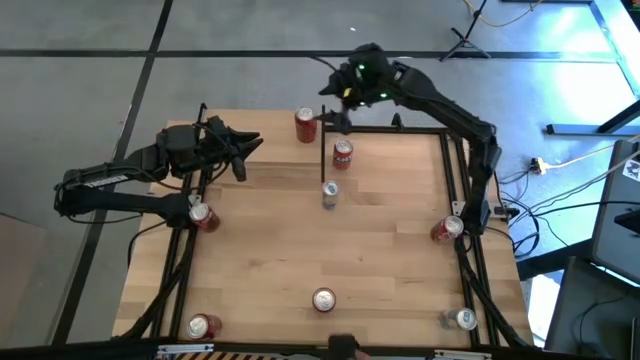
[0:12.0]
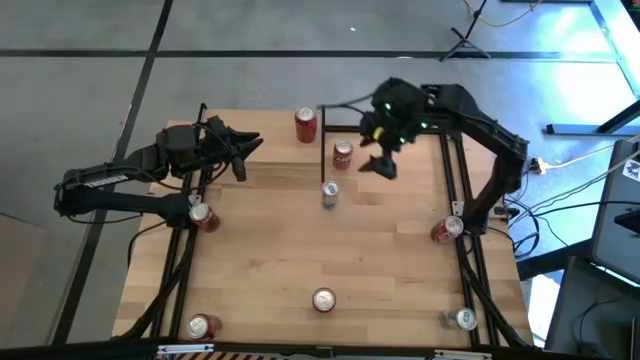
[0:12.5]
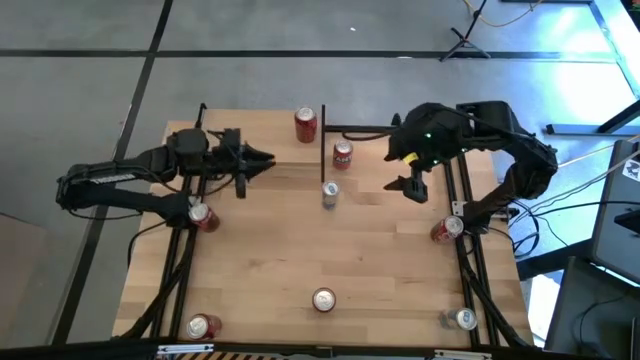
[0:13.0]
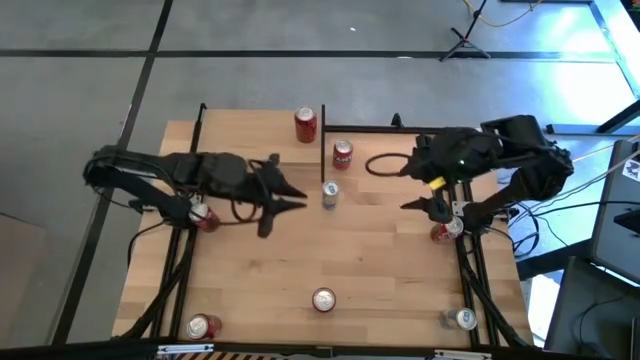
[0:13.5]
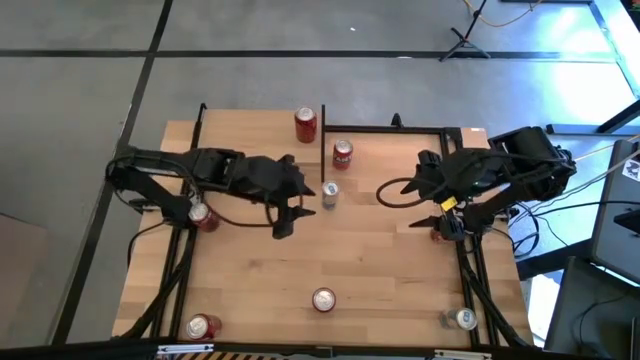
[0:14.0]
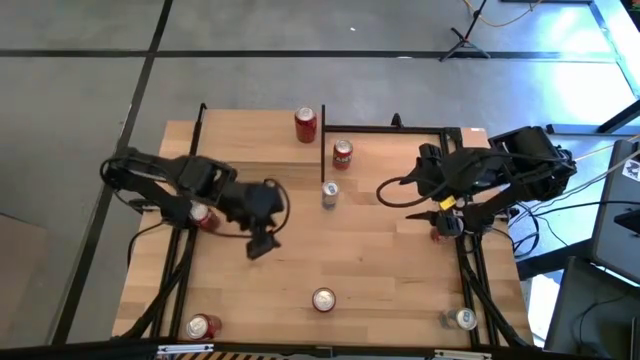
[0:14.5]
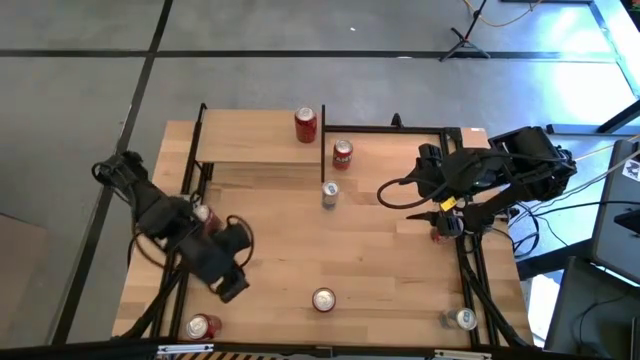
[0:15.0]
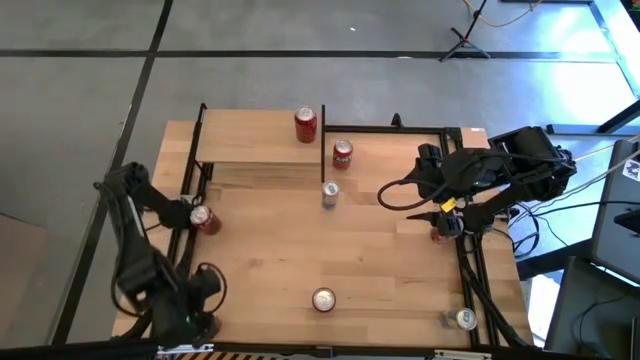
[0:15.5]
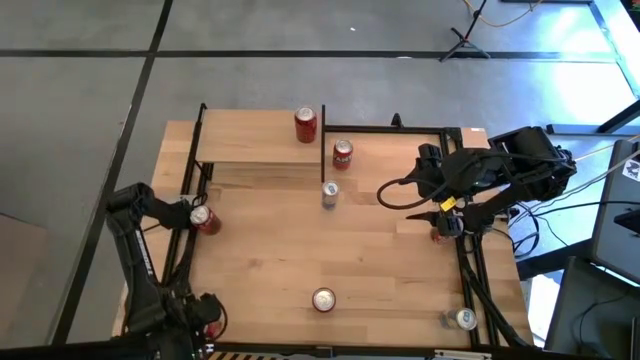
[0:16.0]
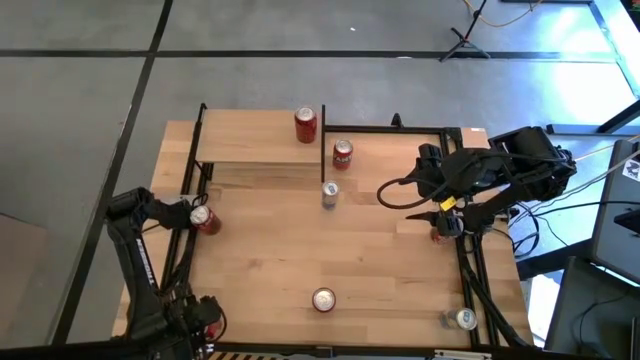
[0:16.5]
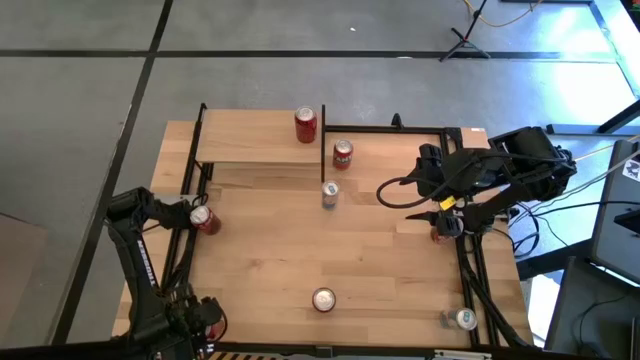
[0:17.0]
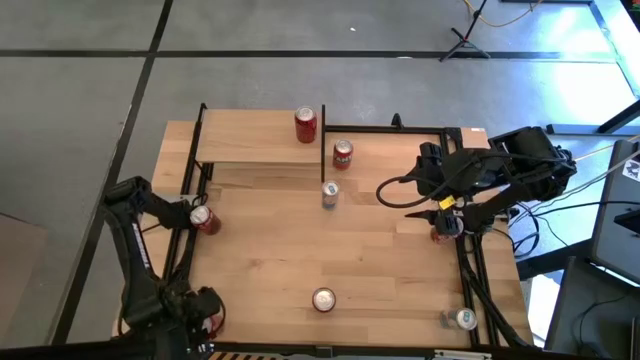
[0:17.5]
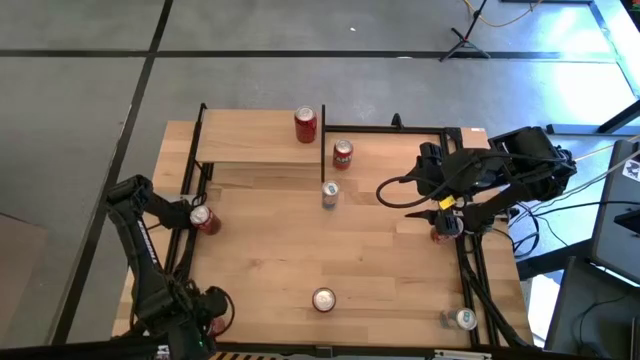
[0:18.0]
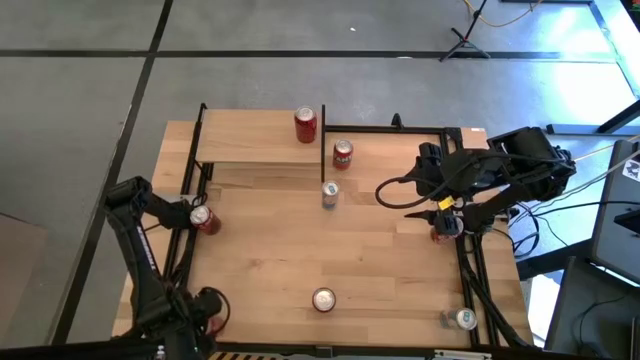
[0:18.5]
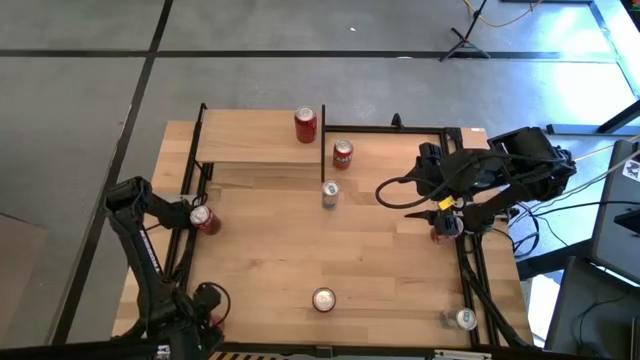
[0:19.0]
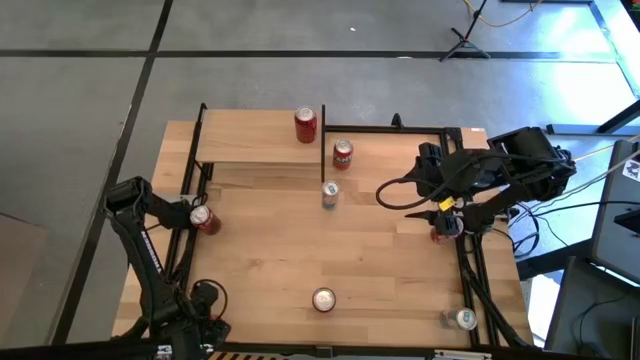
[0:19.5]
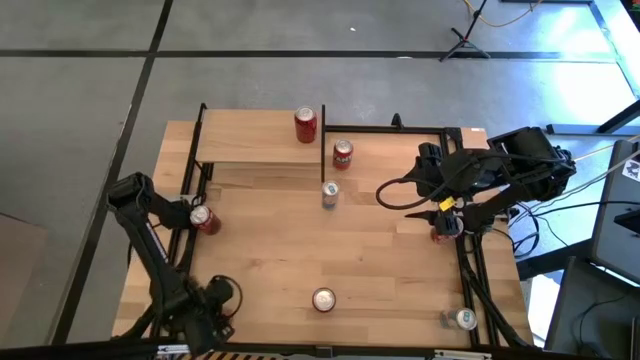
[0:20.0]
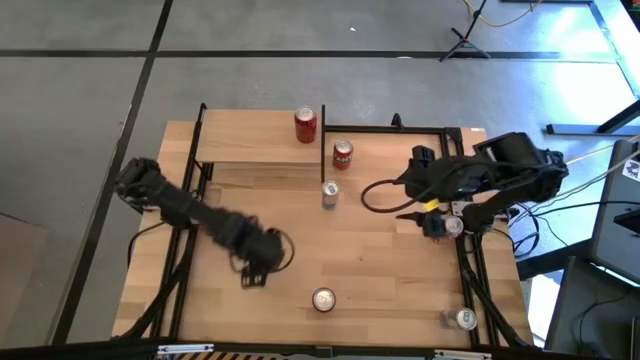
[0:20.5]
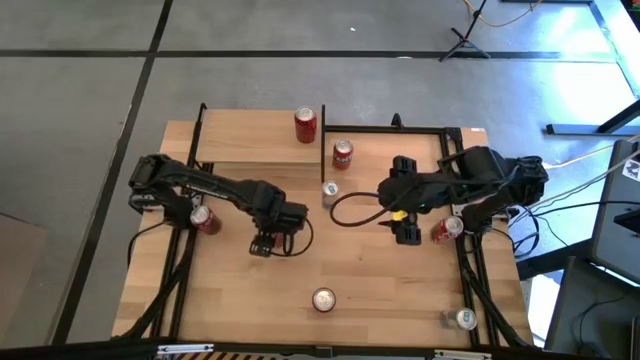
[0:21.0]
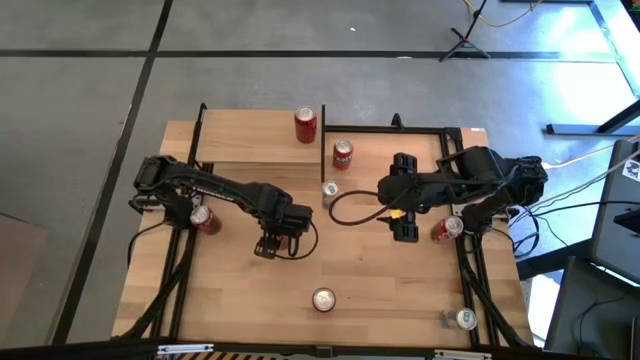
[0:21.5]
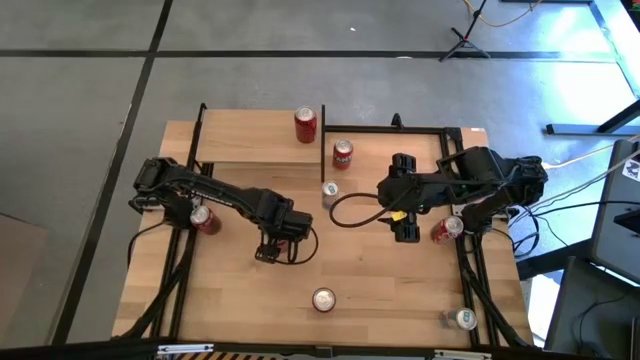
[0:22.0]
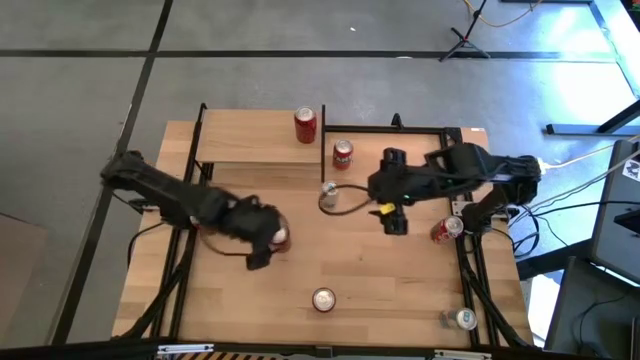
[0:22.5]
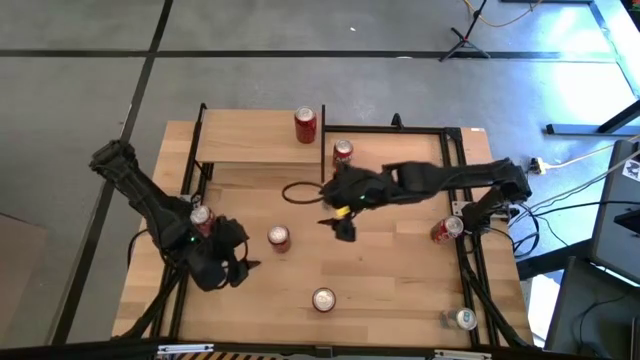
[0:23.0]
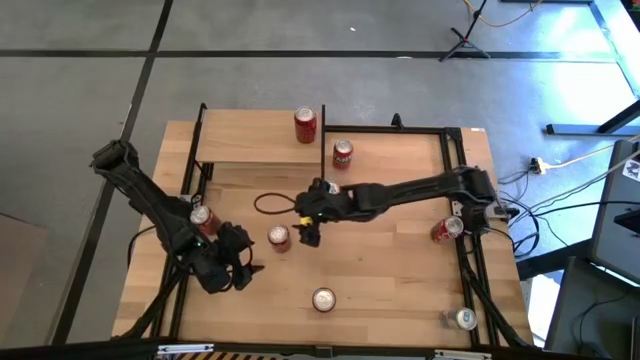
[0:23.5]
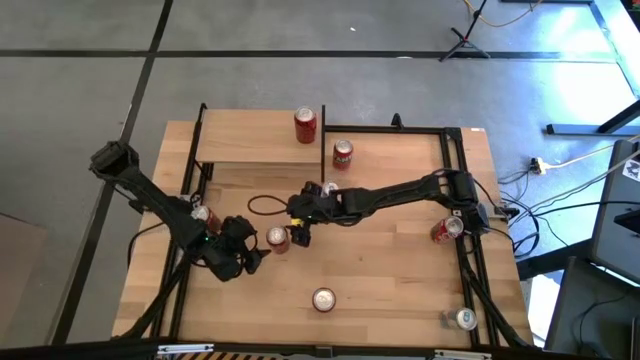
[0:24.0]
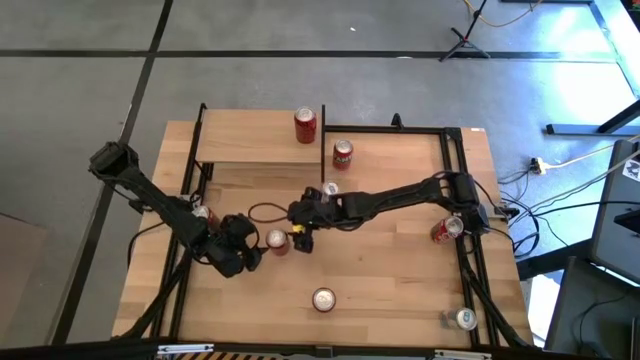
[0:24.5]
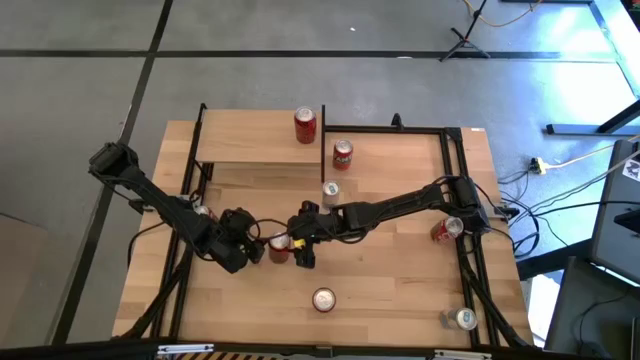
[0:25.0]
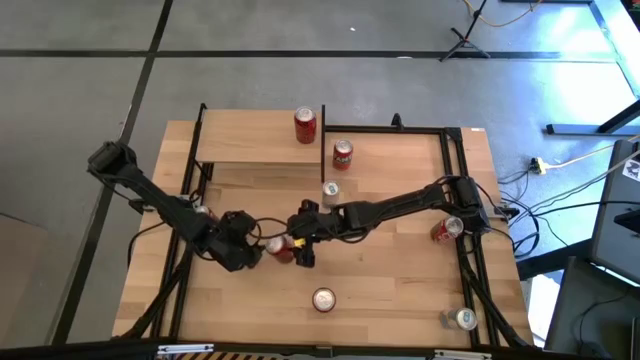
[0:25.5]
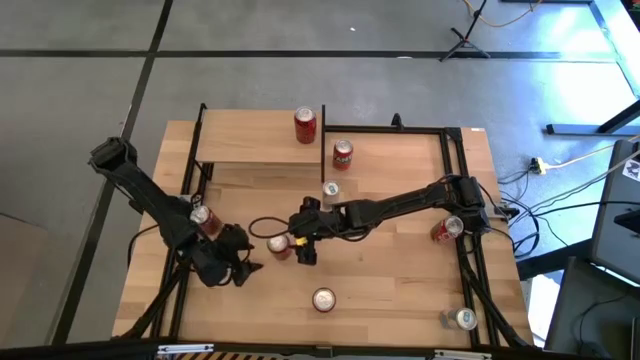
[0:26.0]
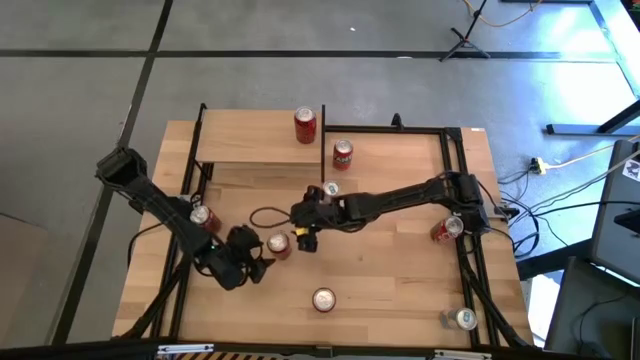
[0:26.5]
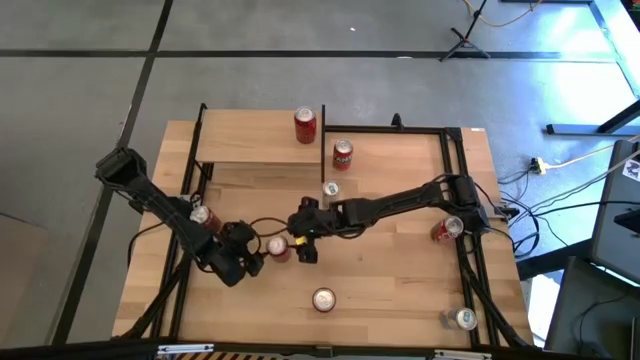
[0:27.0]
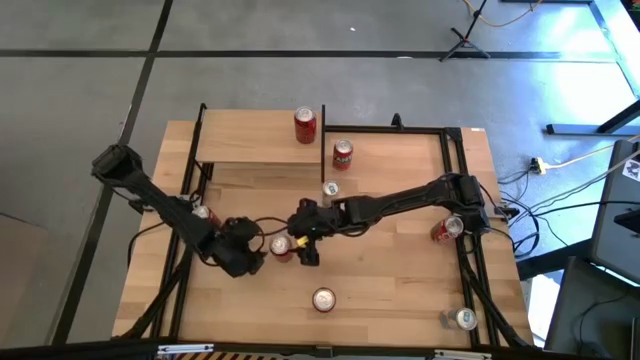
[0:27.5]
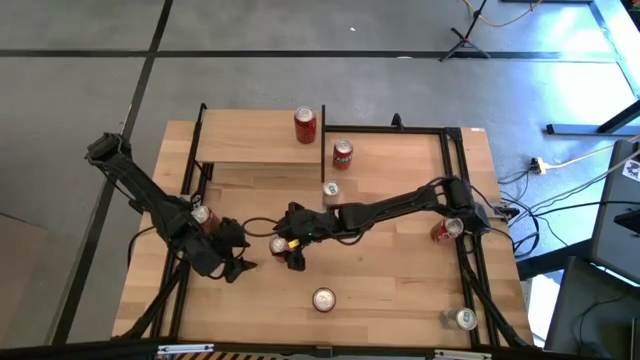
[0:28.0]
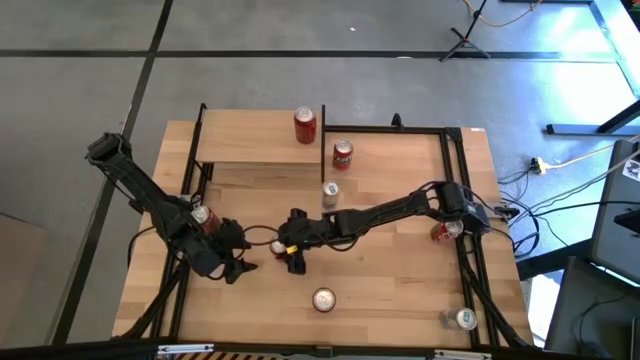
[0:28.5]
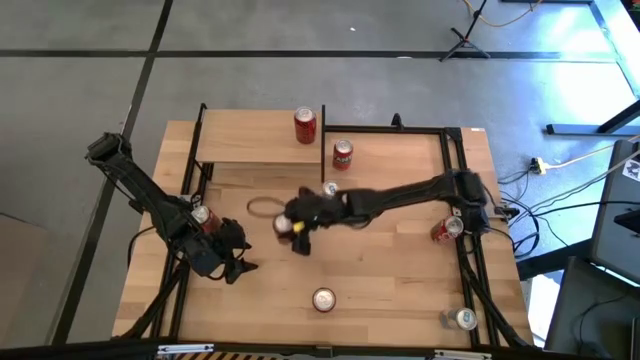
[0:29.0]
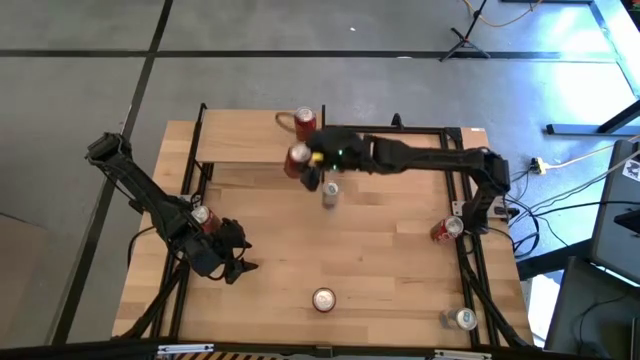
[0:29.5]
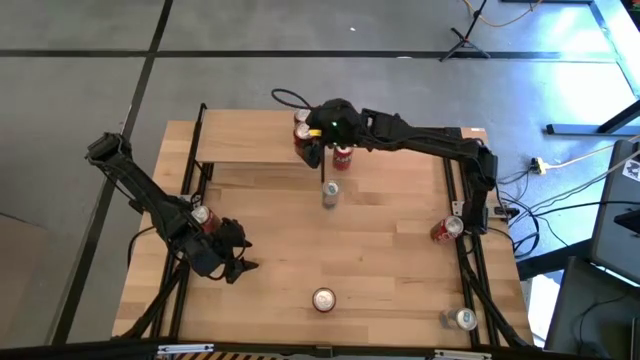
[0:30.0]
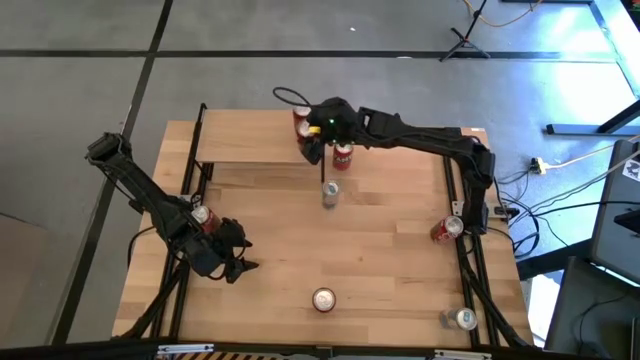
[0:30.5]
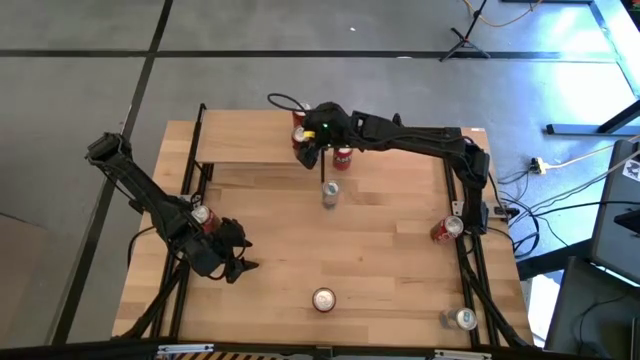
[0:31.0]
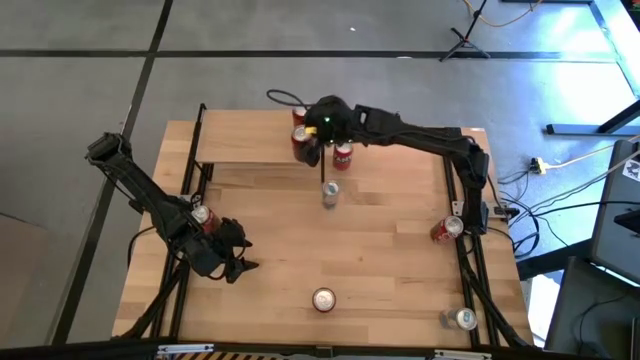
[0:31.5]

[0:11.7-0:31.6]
Task: Place canned beverage on shelf
Put the red black soda can on the shelf aligned with the other red black soda can
